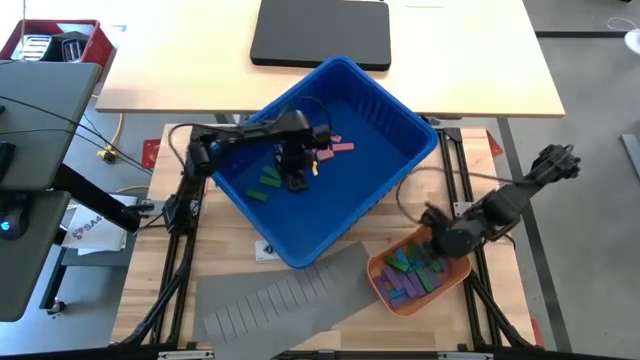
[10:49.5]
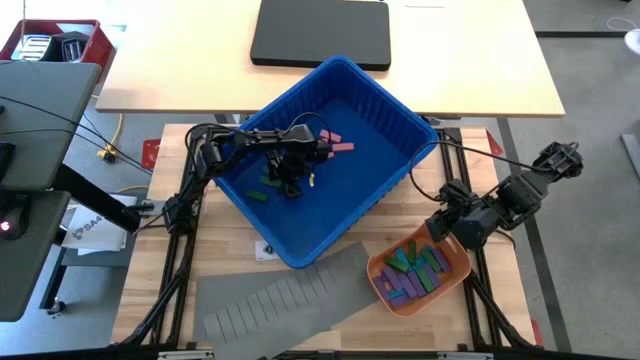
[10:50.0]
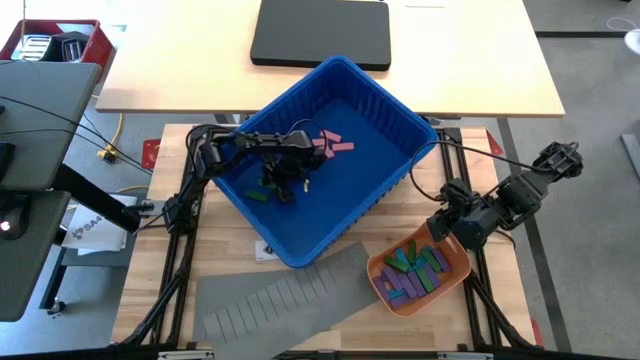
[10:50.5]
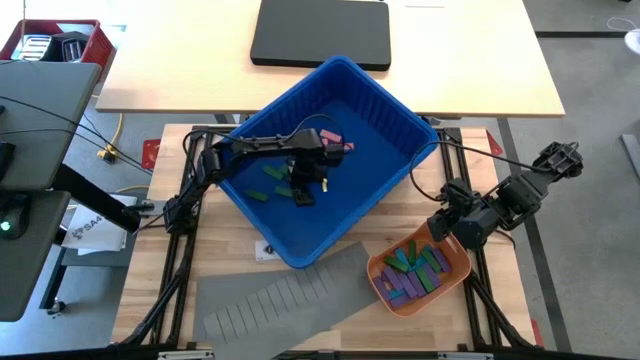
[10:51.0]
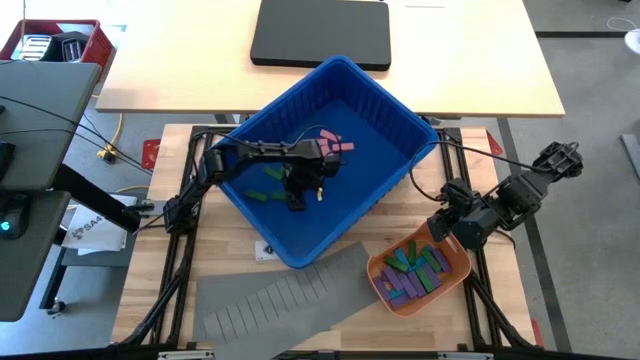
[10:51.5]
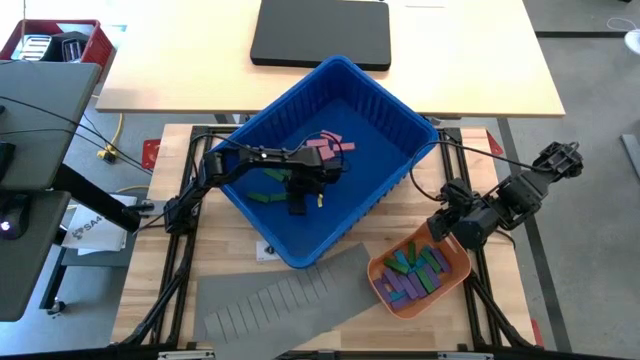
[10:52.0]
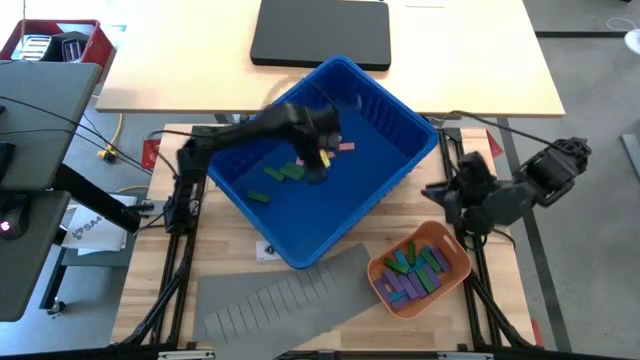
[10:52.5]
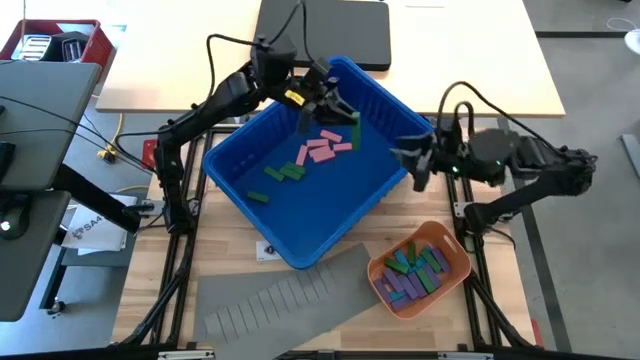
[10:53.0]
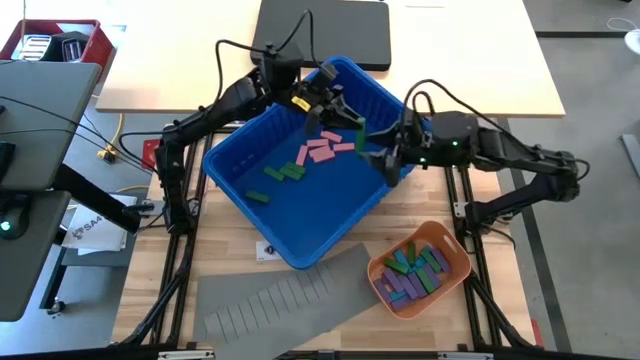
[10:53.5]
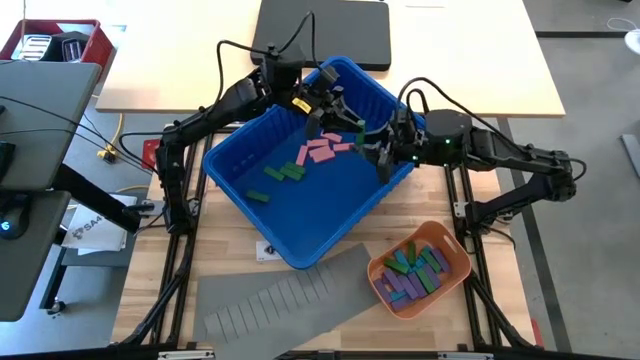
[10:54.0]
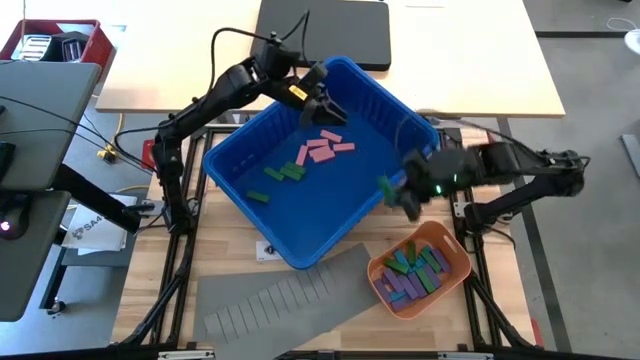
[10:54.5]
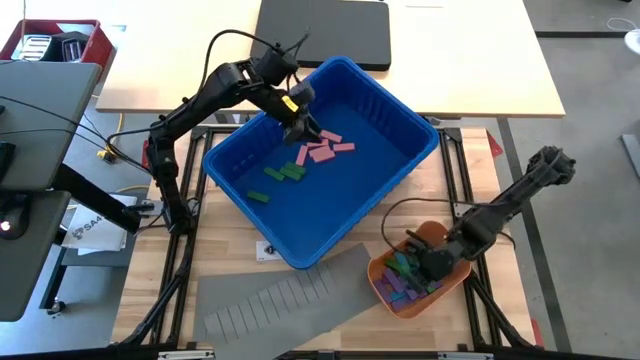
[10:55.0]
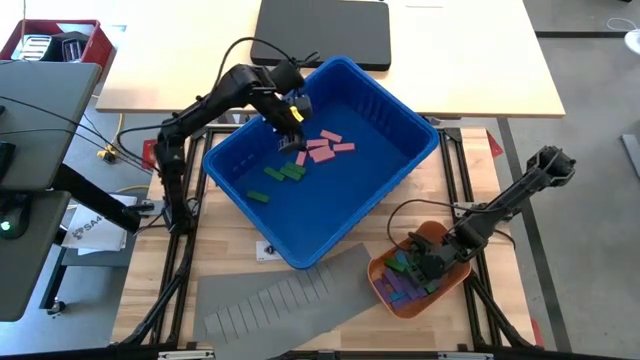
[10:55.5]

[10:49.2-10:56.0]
Task: Sort blocks
Put the green block into the orange bin

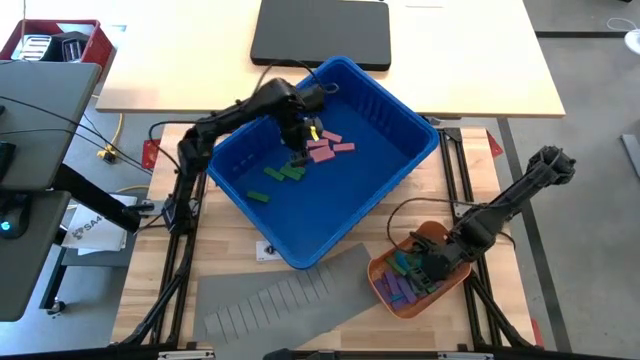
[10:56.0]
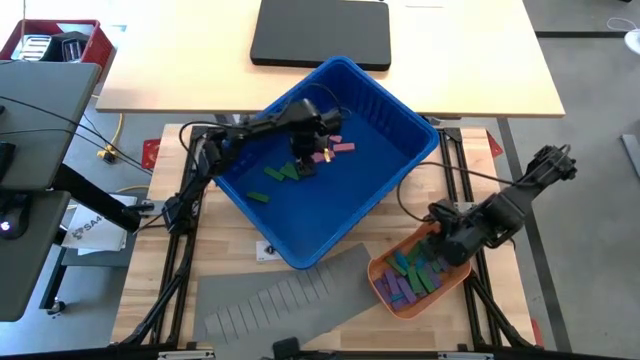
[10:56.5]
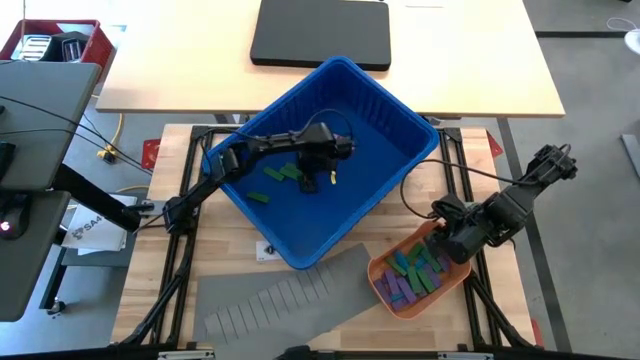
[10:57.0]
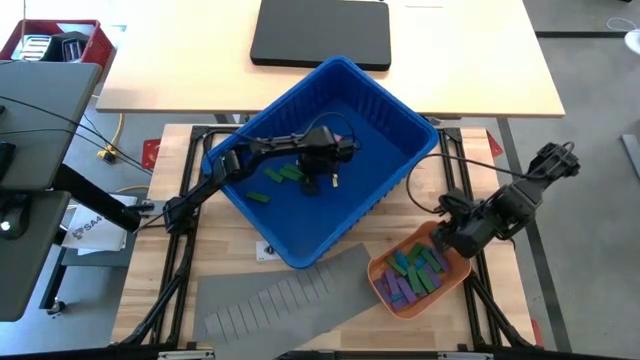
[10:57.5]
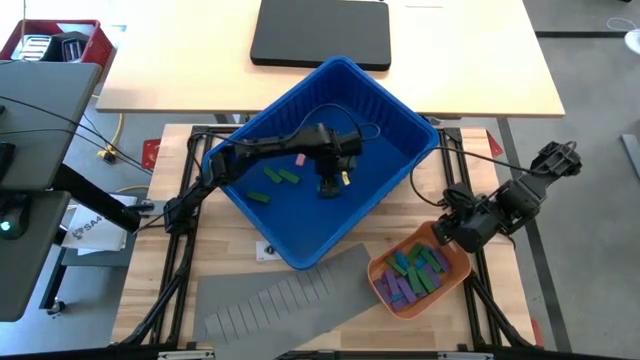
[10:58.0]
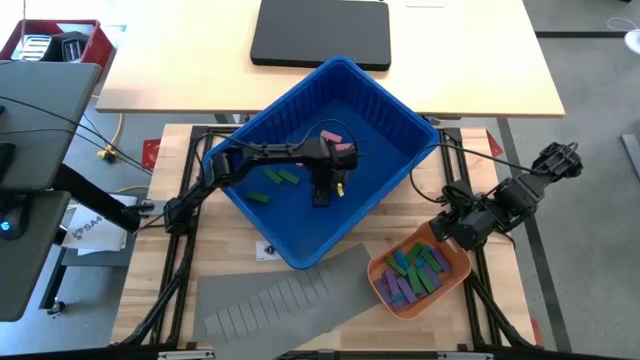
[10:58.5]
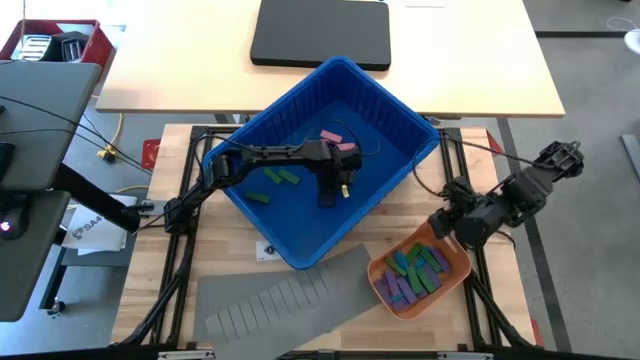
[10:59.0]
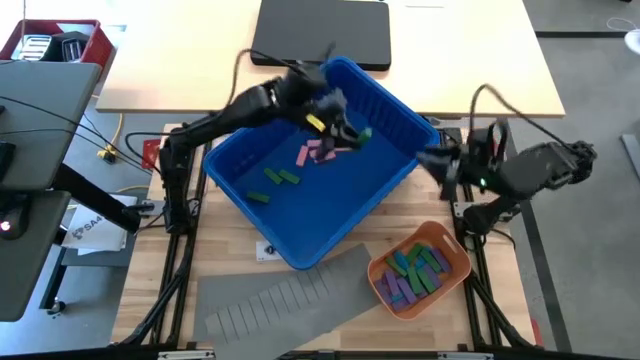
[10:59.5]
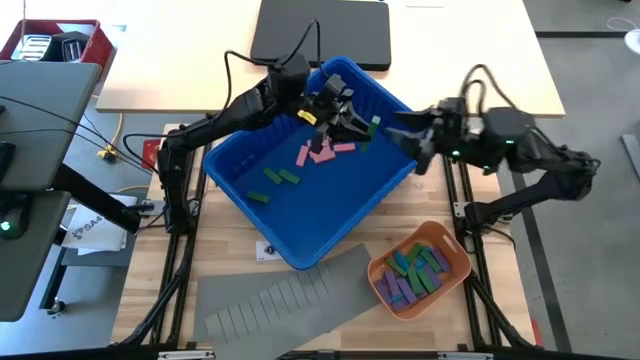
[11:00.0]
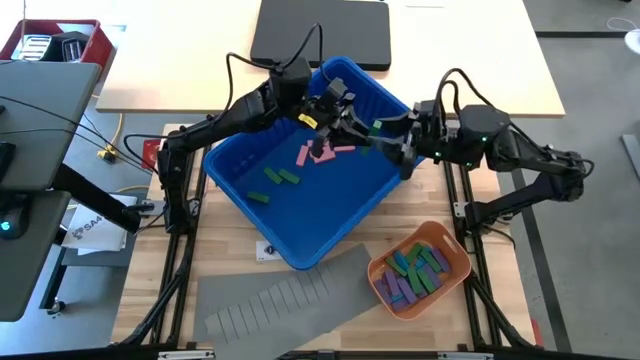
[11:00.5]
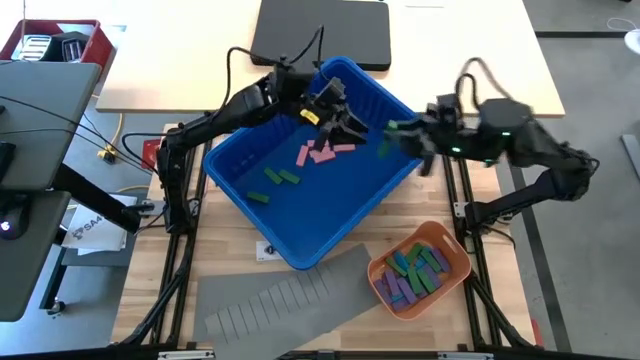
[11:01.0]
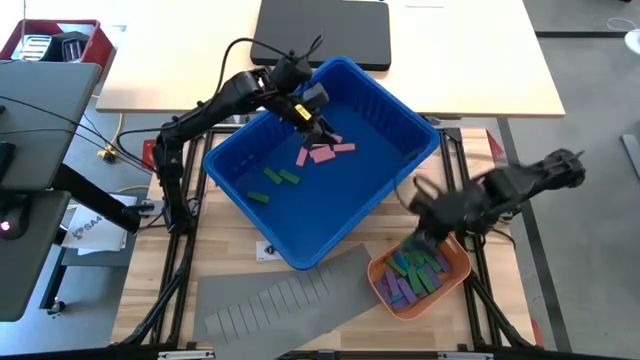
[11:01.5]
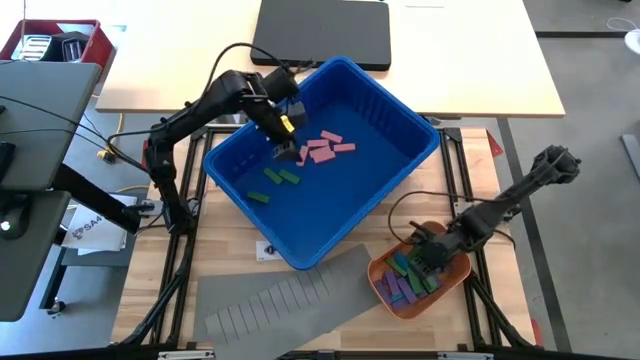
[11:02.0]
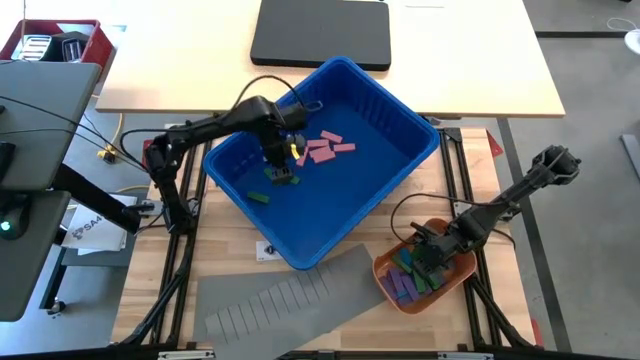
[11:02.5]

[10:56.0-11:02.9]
Put the green block into the orange bin

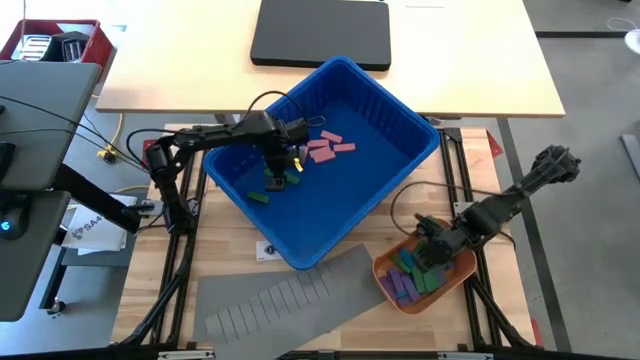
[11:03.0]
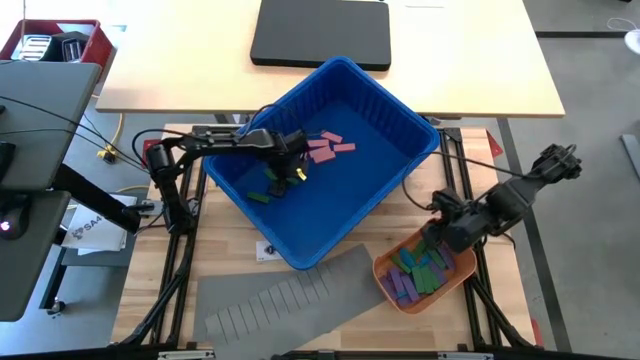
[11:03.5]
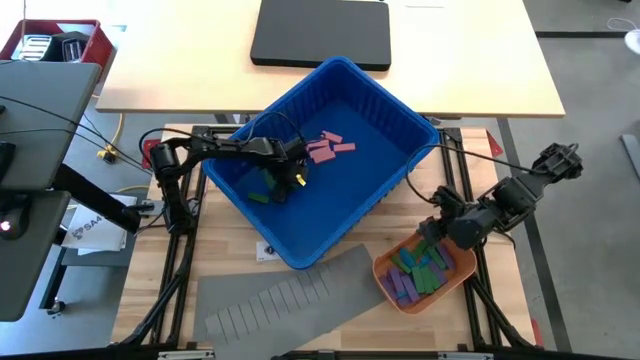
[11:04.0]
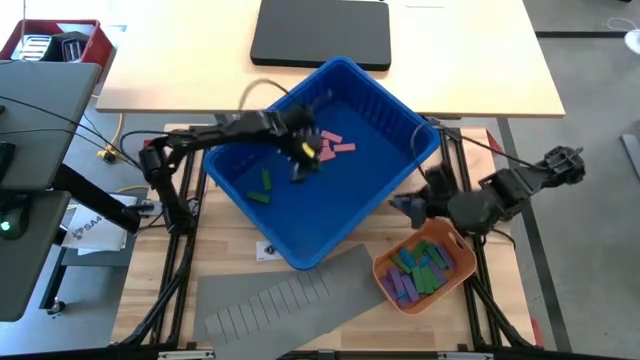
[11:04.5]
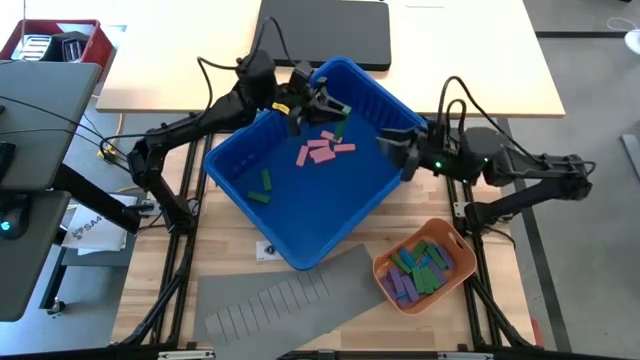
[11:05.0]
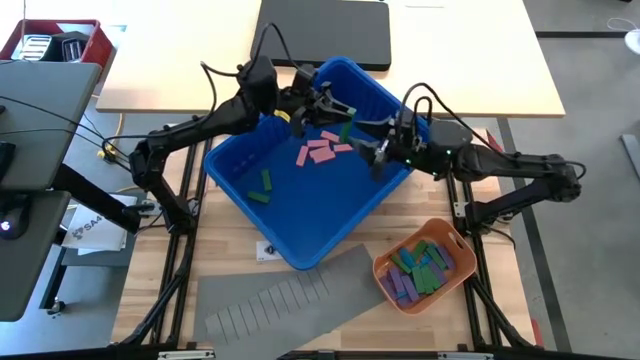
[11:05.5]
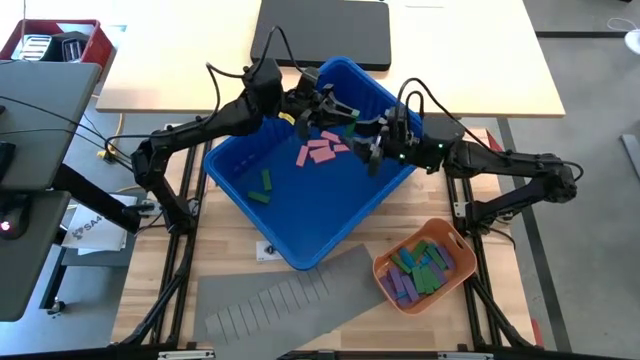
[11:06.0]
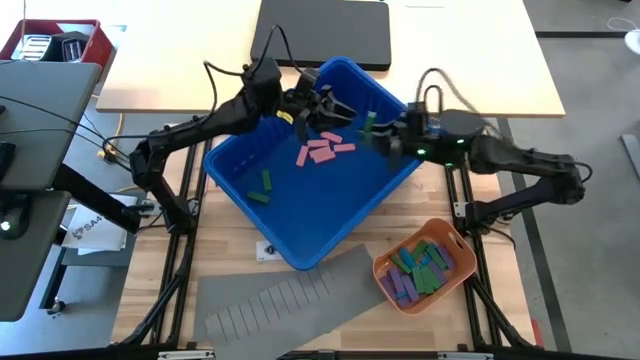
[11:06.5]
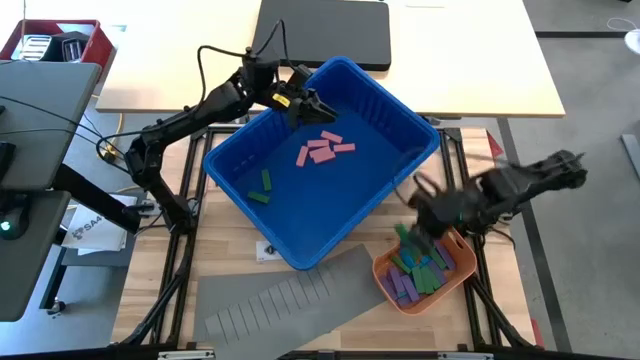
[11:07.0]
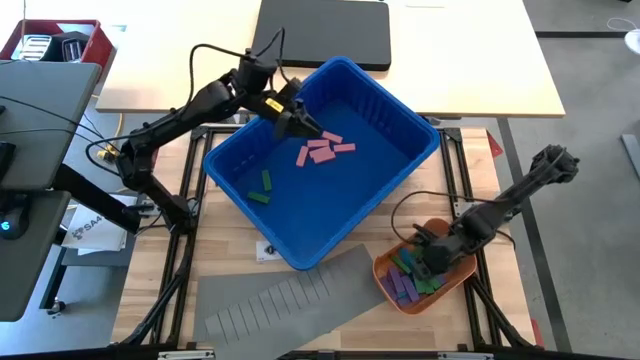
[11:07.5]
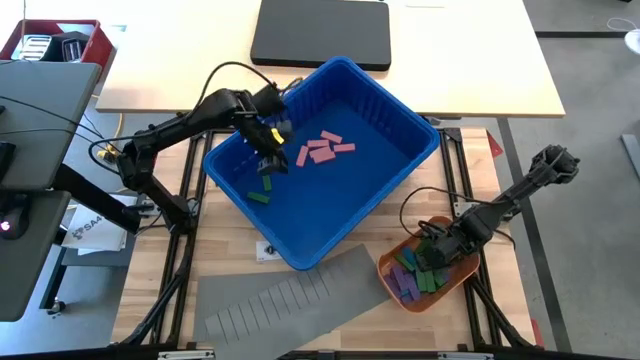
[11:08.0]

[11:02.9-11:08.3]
Put the green block into the orange bin

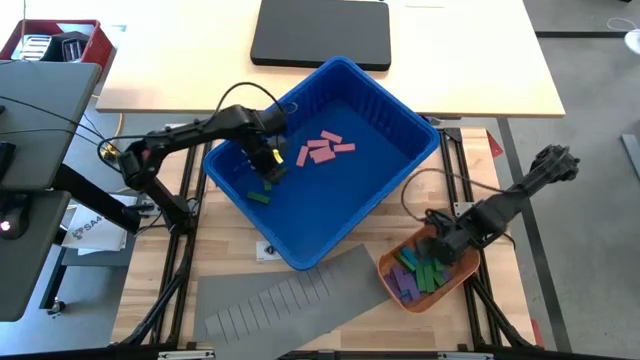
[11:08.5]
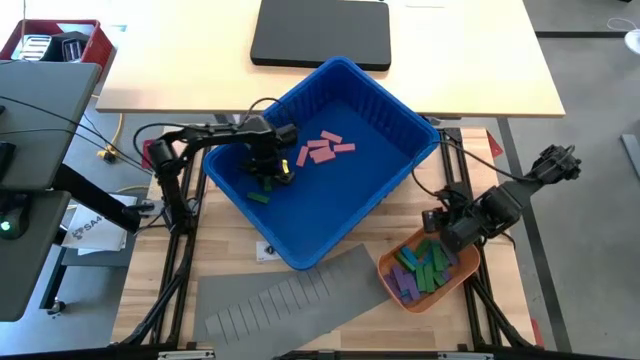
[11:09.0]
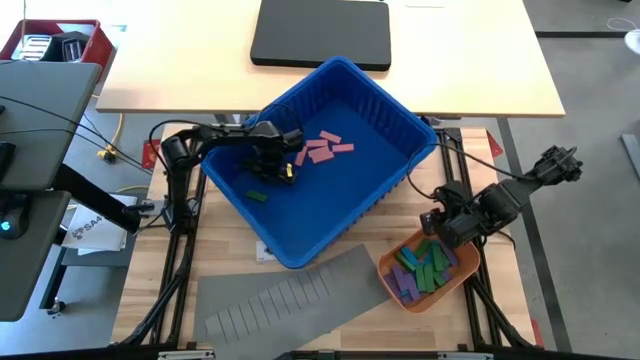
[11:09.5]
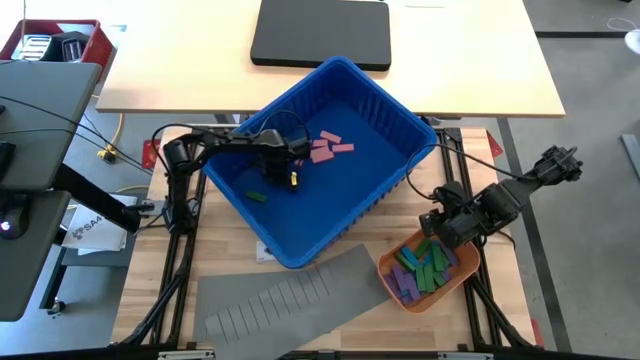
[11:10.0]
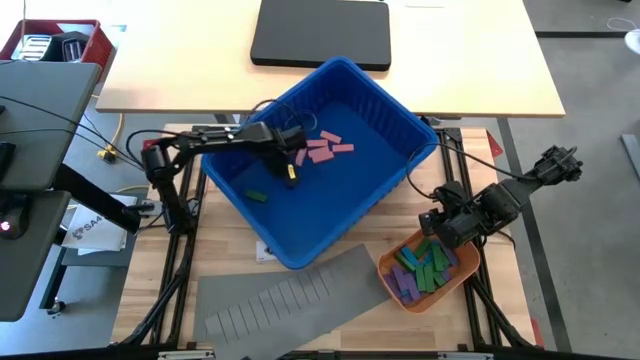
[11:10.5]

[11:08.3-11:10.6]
Put the green block into the orange bin
